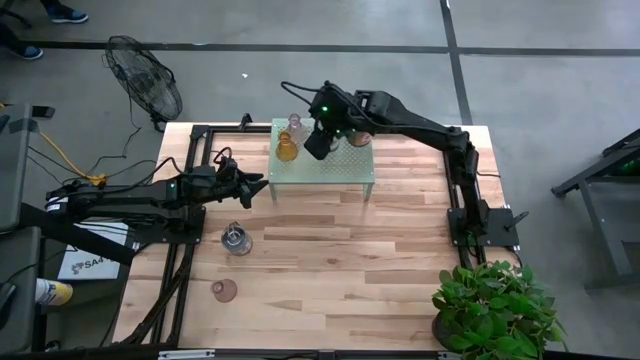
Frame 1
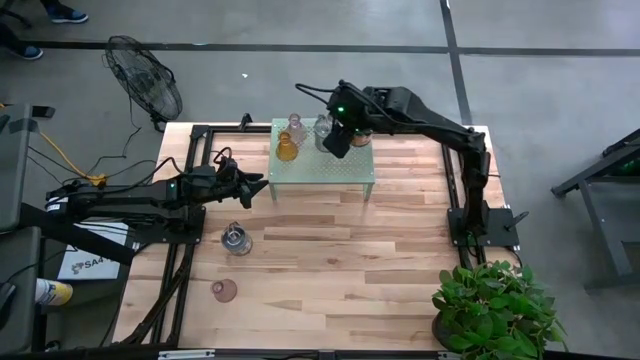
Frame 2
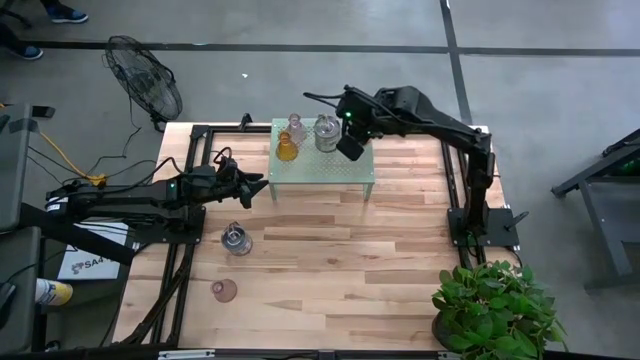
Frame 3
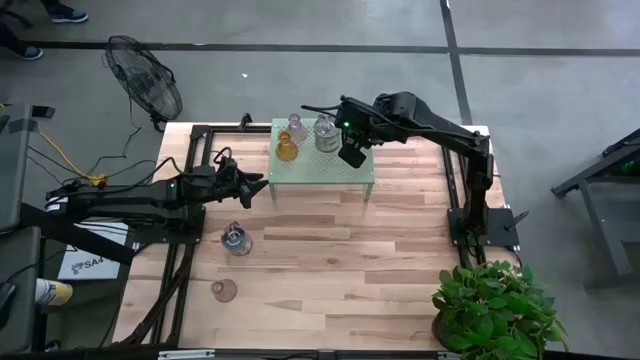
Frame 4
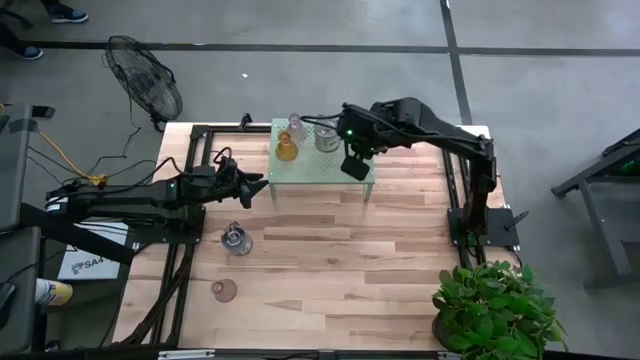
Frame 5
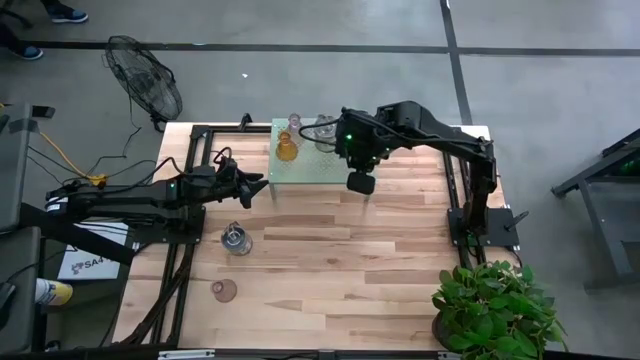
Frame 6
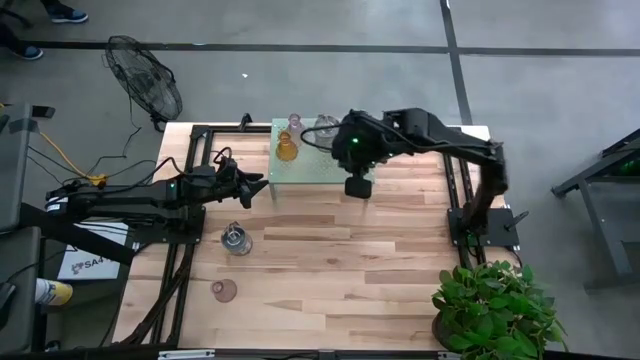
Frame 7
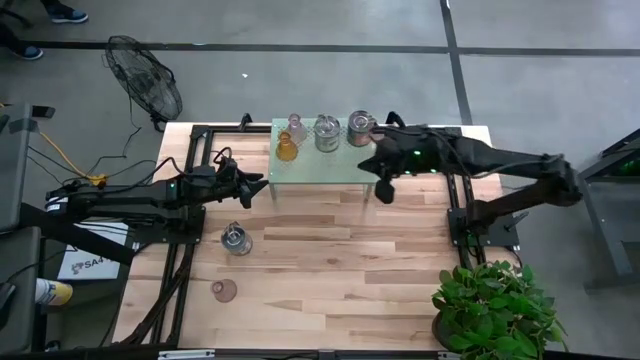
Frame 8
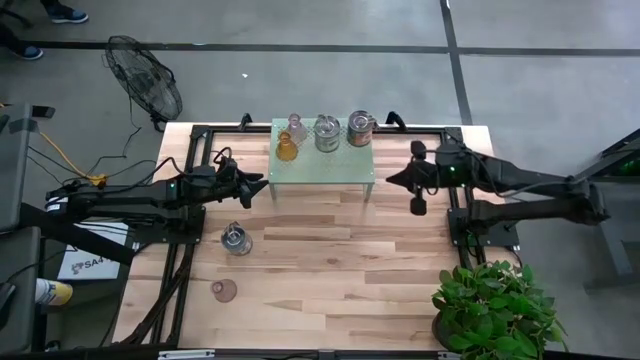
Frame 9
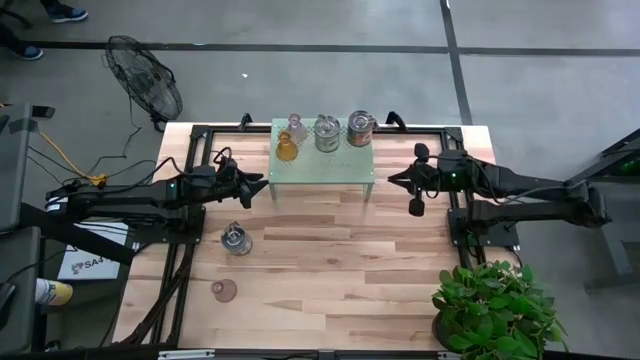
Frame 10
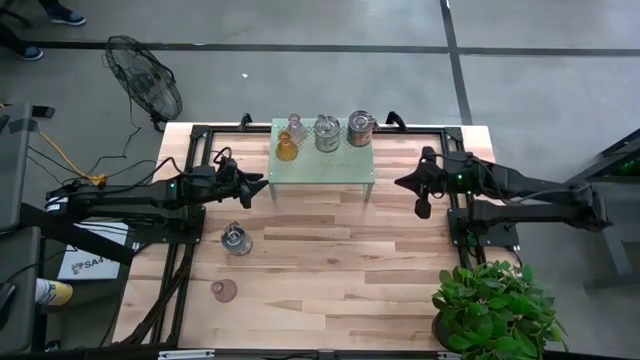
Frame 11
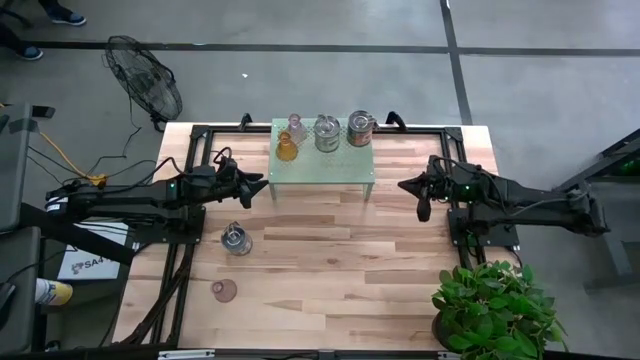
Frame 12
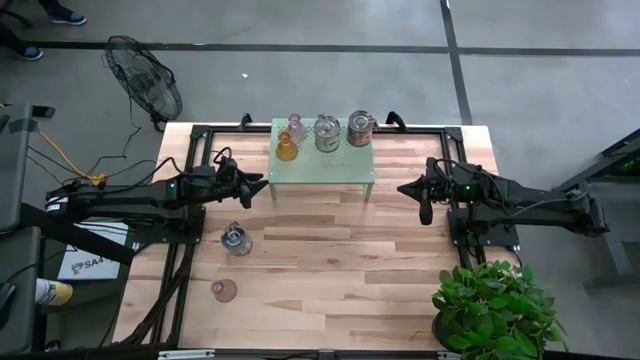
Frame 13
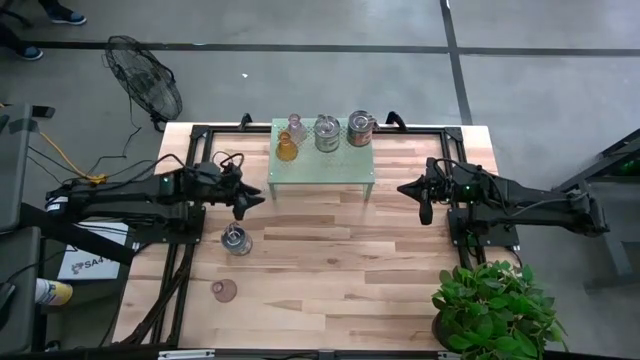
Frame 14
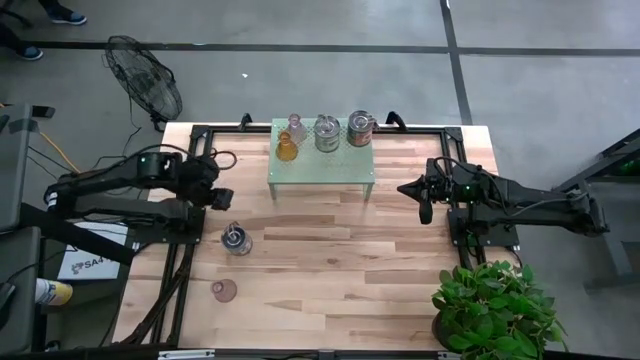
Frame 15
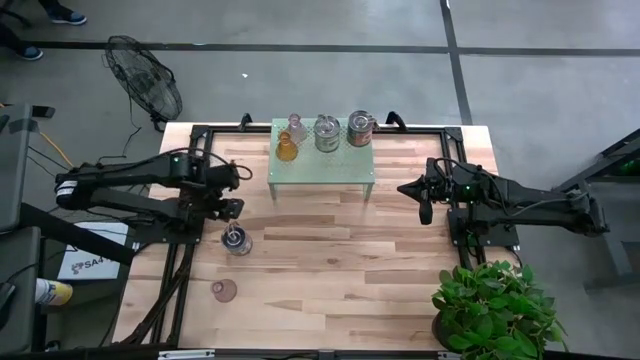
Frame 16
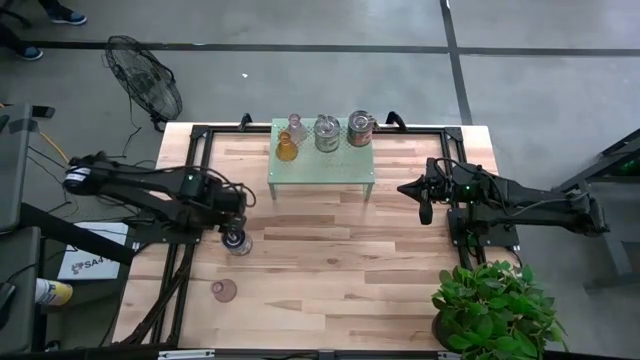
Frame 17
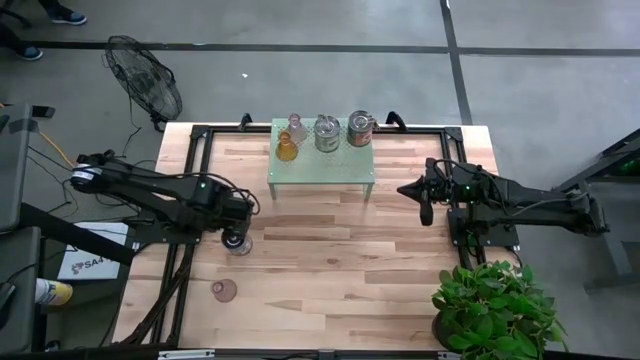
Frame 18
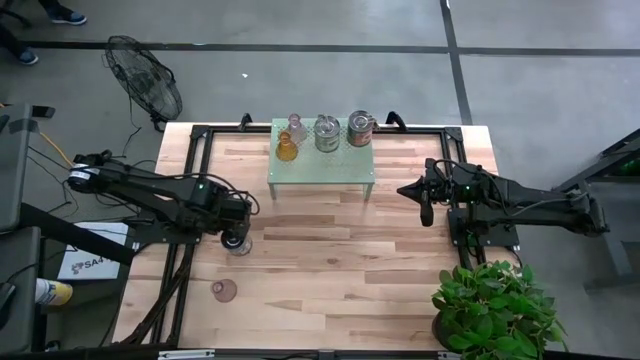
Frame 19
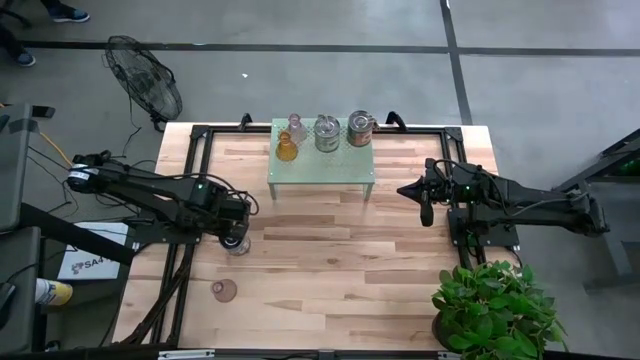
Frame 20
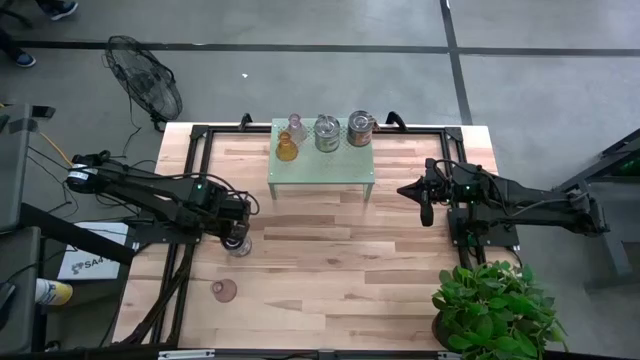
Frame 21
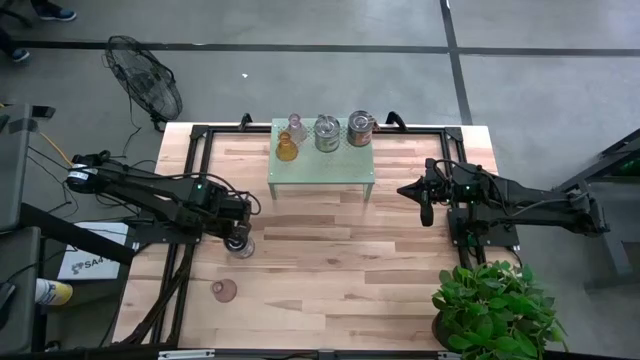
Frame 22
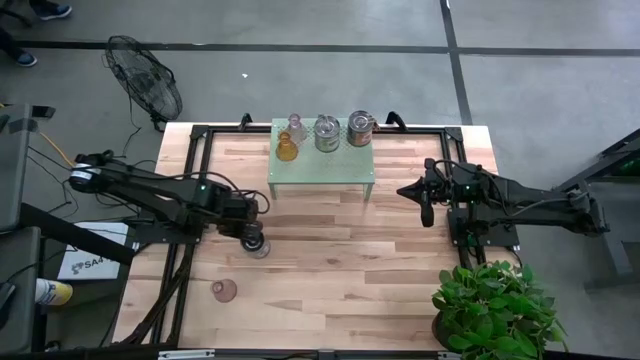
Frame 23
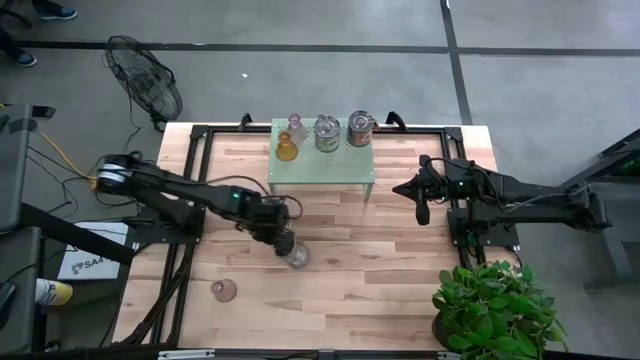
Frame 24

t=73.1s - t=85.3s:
Task: Pick & Place candle stick holders
Put the silver scented candle on the shelf

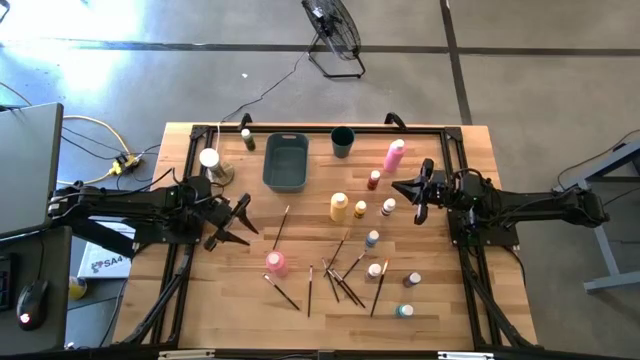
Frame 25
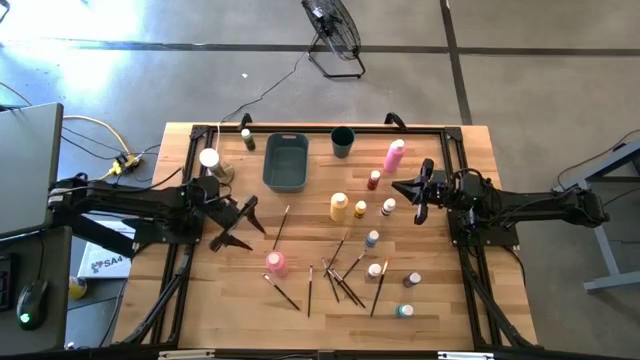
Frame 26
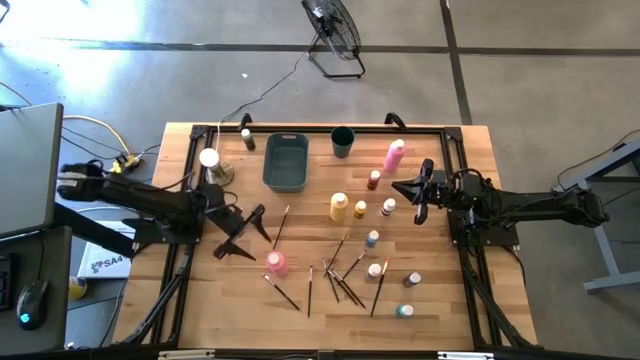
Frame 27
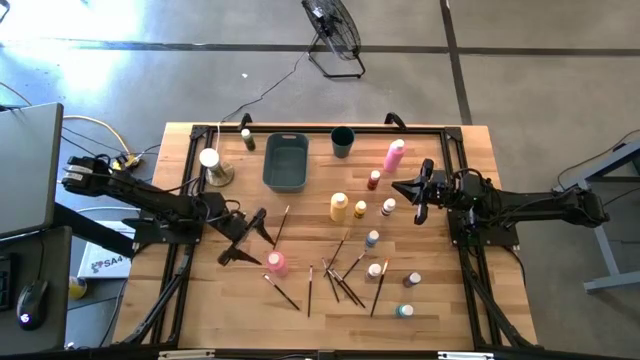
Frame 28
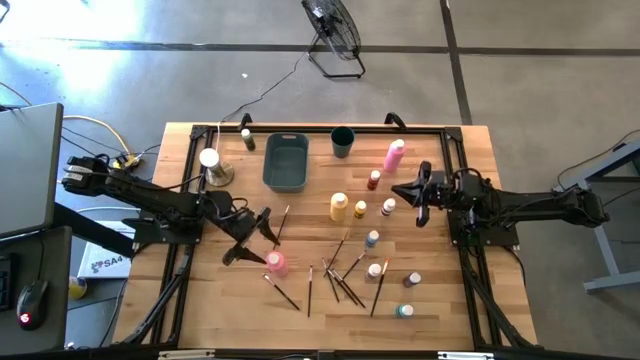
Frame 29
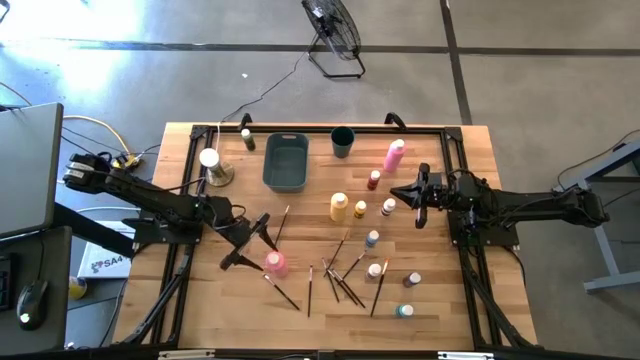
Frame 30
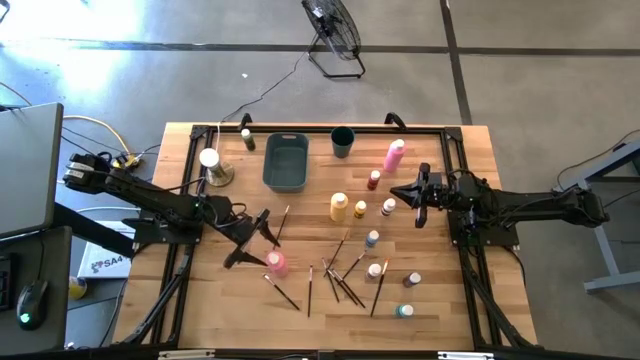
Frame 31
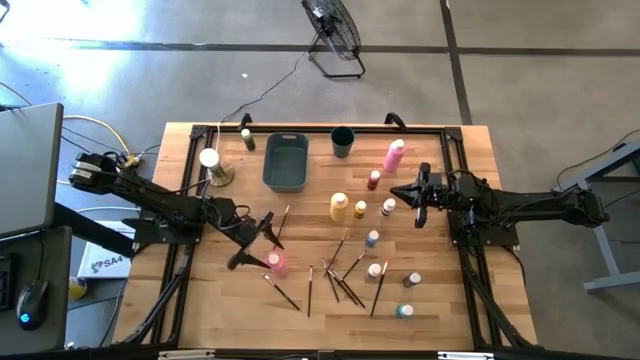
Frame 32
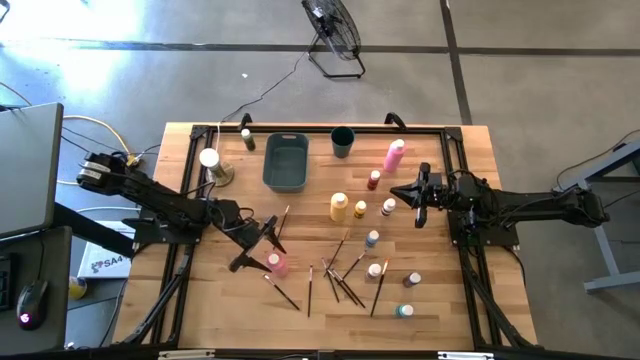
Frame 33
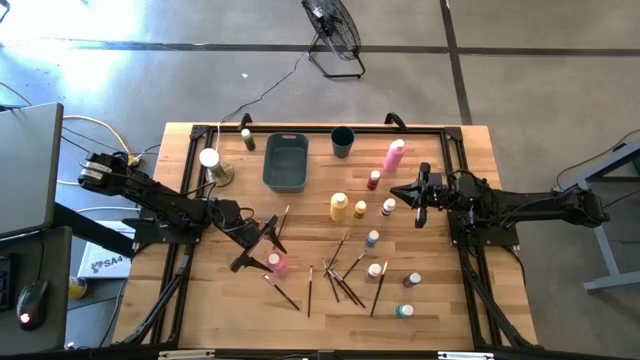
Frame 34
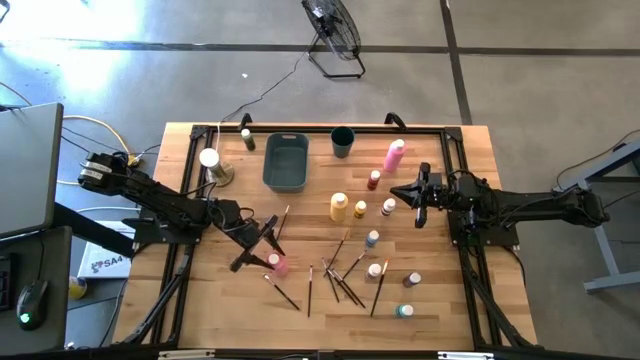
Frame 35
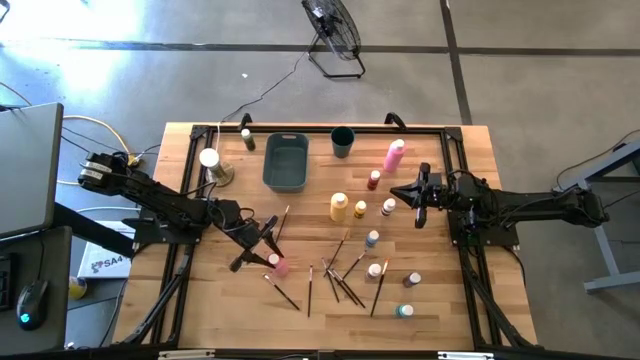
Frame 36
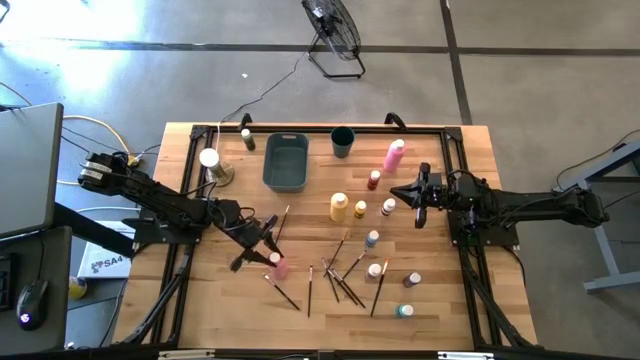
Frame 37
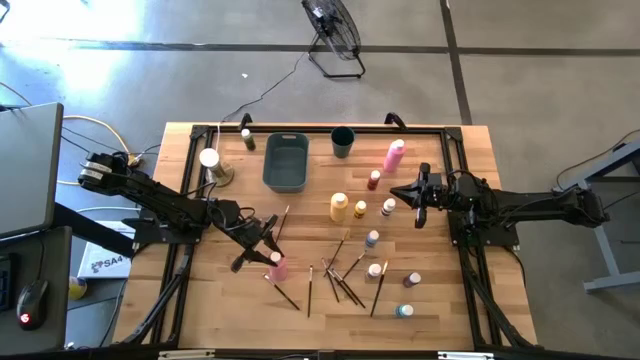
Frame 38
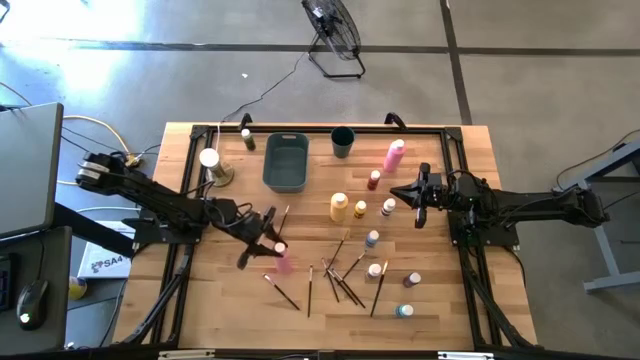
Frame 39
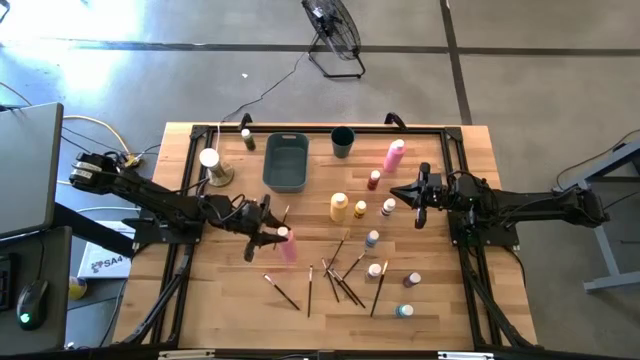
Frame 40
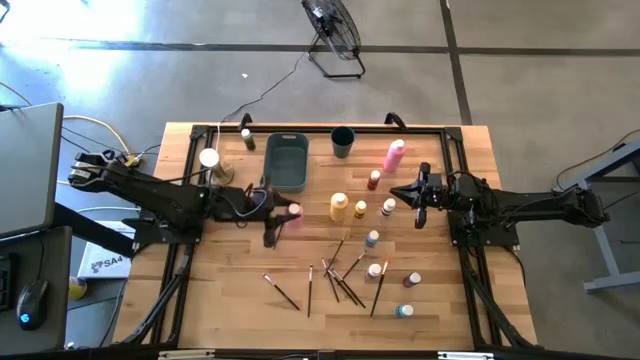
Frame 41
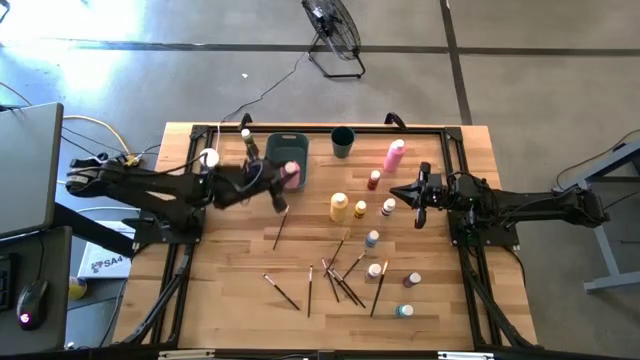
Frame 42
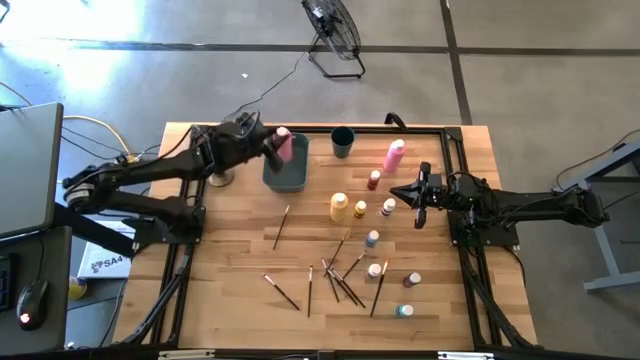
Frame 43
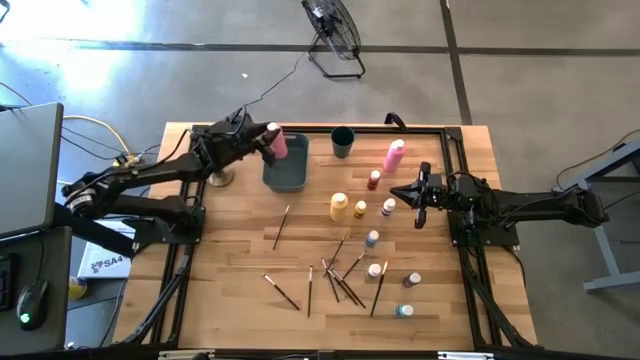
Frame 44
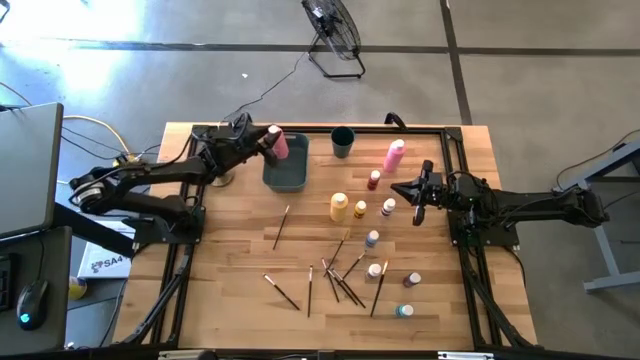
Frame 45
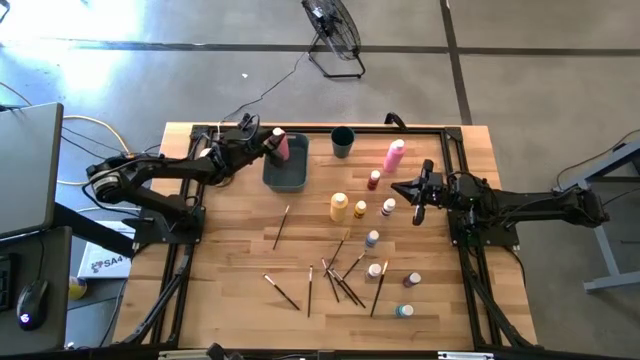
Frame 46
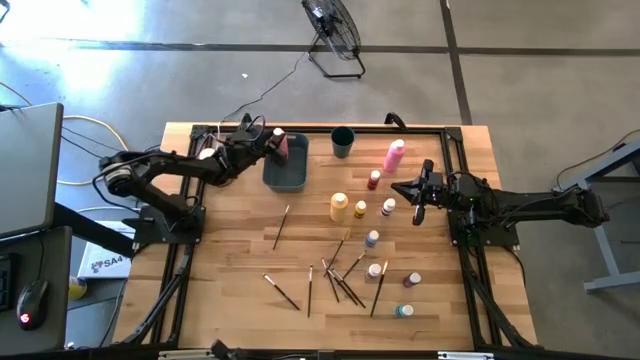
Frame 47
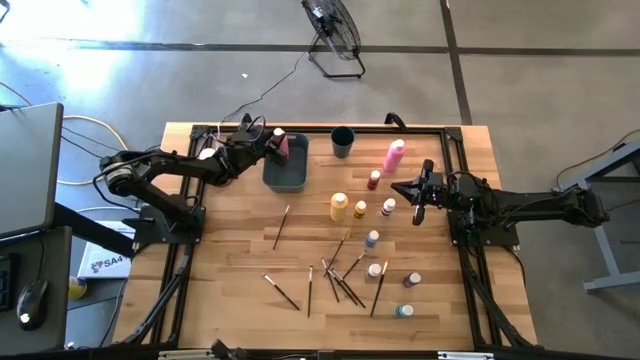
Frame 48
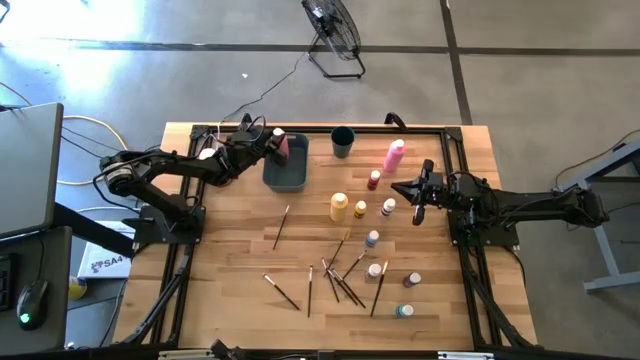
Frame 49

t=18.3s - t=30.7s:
Task: Pick & Place Paint Supplies
Put the large pink paint bottle into the green bin
